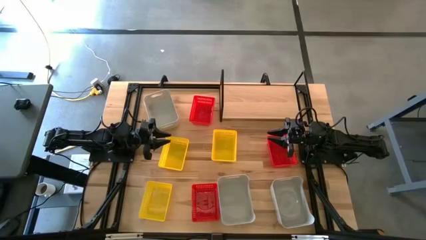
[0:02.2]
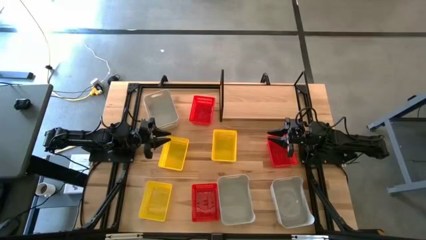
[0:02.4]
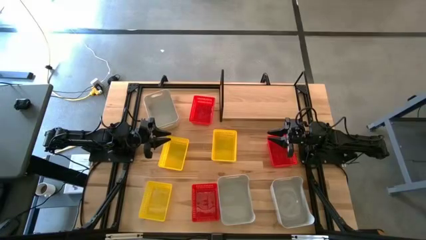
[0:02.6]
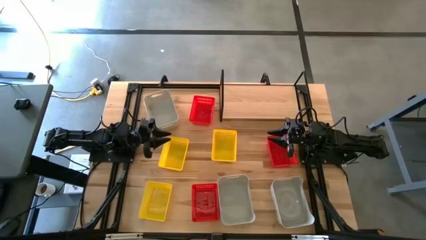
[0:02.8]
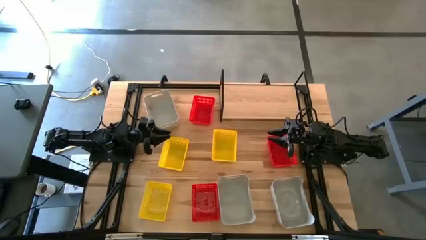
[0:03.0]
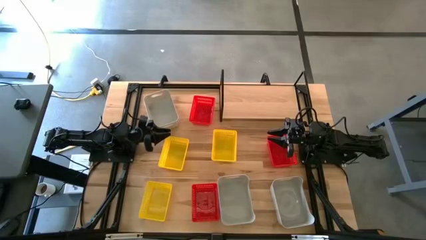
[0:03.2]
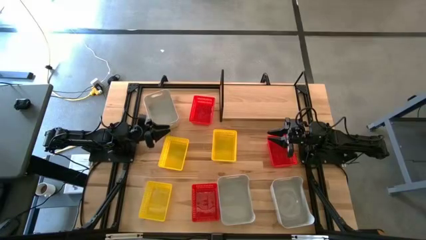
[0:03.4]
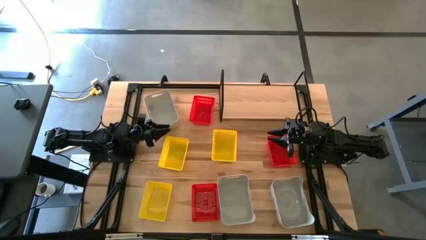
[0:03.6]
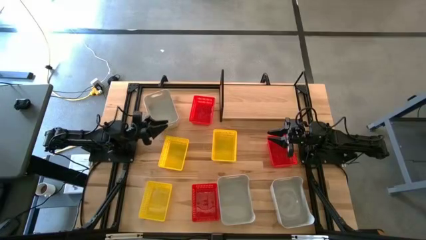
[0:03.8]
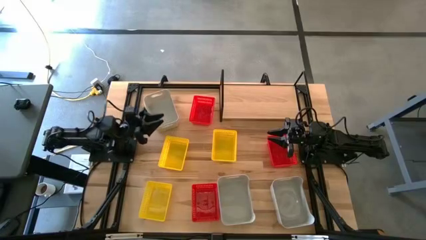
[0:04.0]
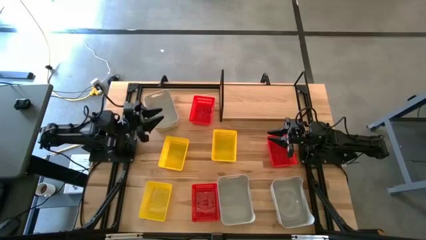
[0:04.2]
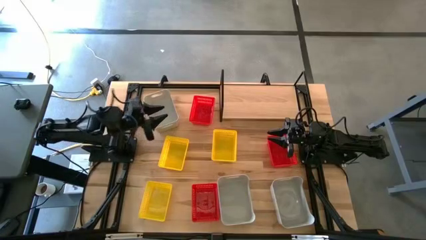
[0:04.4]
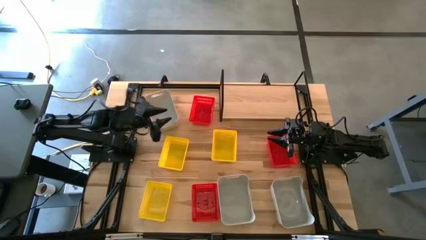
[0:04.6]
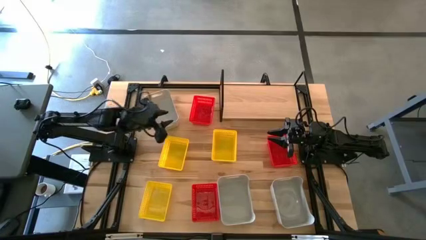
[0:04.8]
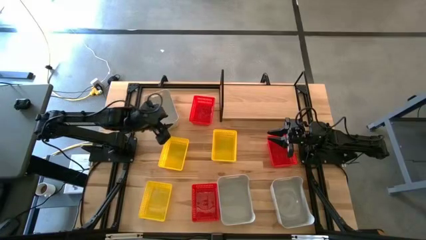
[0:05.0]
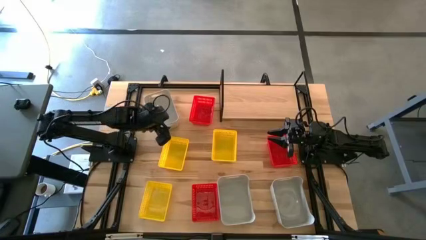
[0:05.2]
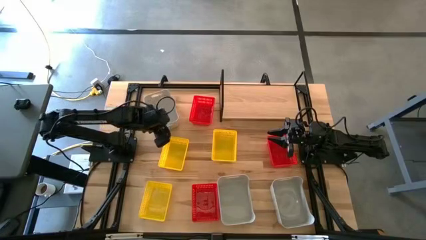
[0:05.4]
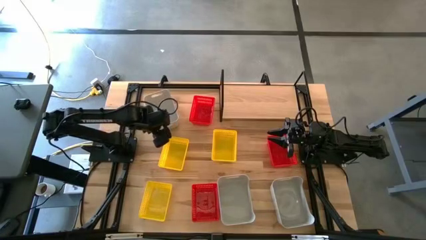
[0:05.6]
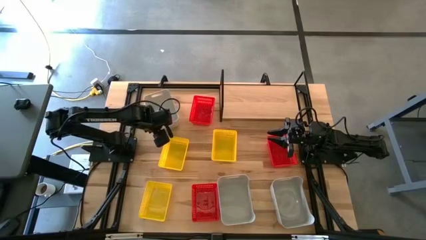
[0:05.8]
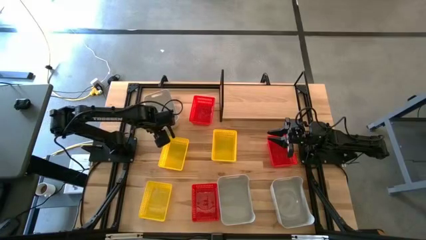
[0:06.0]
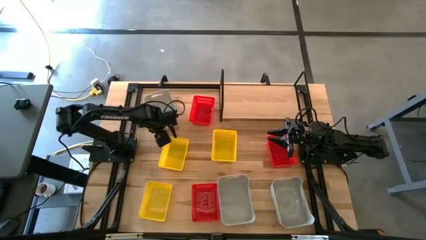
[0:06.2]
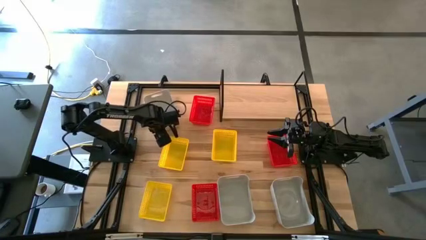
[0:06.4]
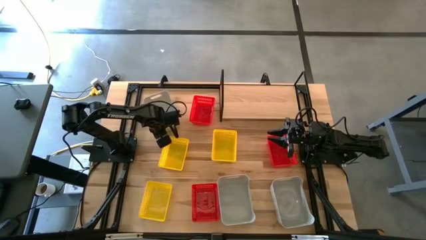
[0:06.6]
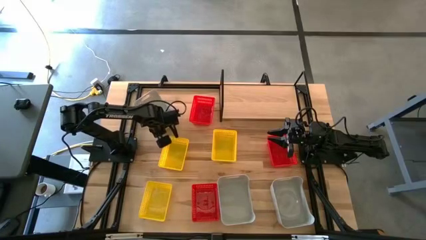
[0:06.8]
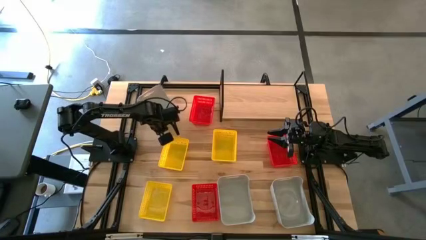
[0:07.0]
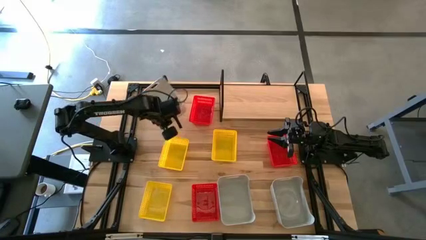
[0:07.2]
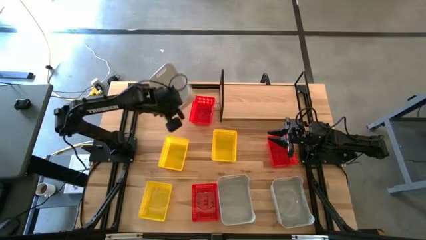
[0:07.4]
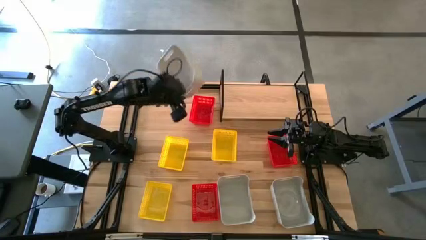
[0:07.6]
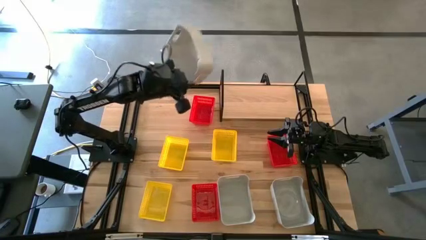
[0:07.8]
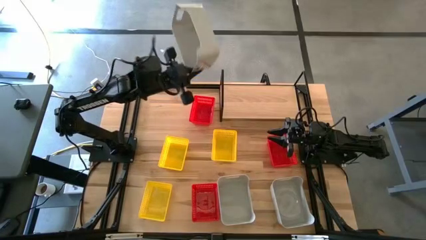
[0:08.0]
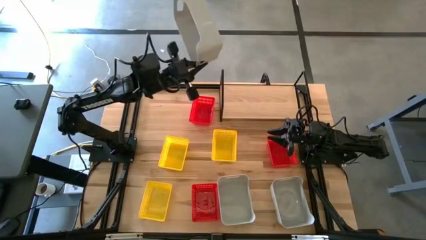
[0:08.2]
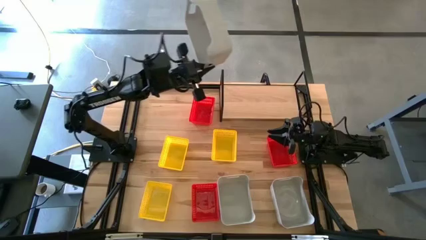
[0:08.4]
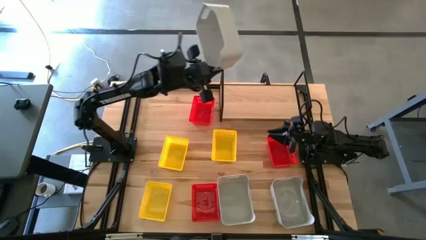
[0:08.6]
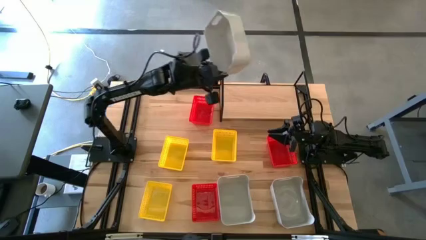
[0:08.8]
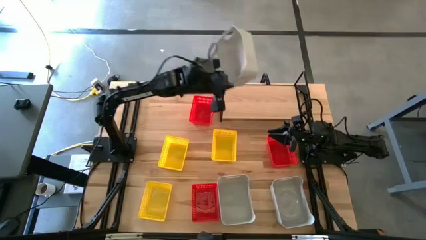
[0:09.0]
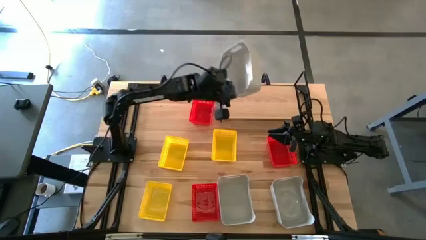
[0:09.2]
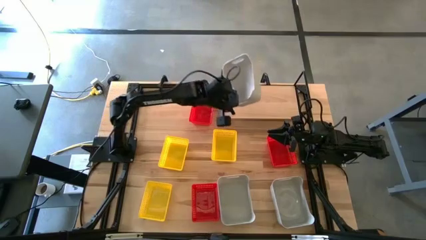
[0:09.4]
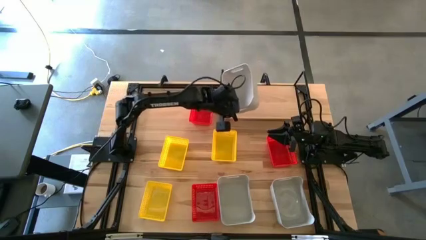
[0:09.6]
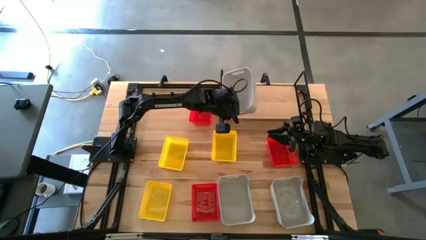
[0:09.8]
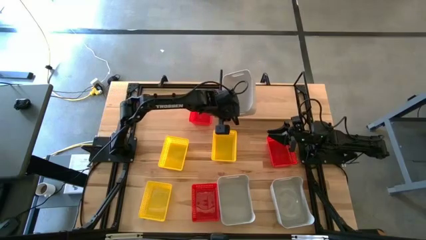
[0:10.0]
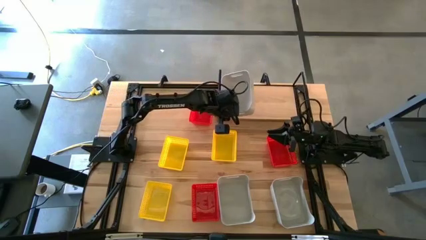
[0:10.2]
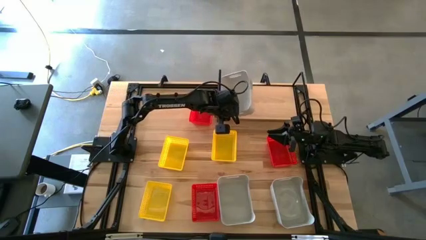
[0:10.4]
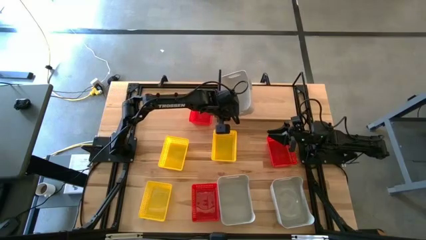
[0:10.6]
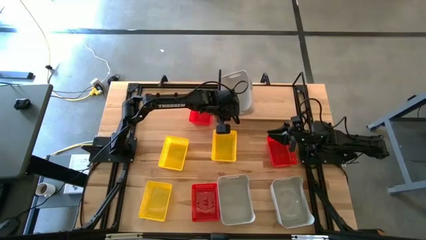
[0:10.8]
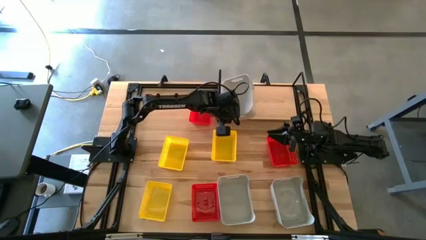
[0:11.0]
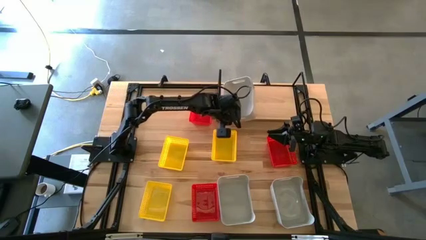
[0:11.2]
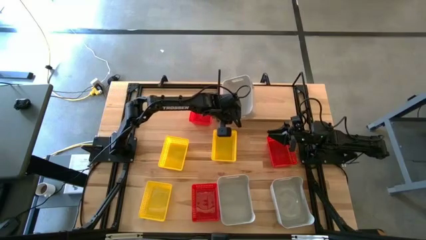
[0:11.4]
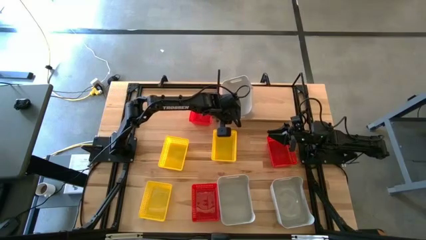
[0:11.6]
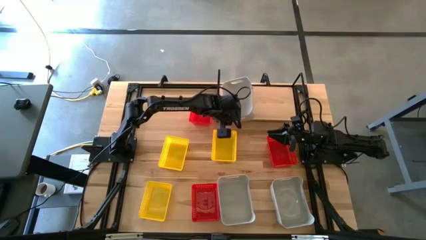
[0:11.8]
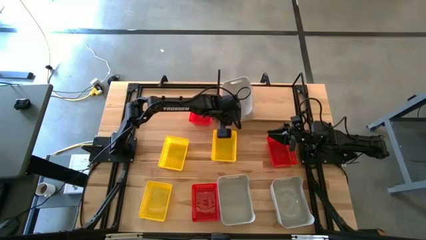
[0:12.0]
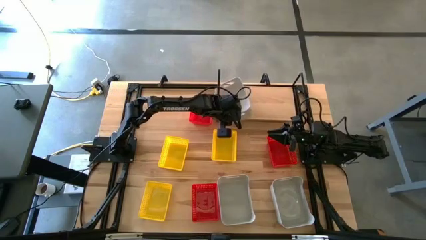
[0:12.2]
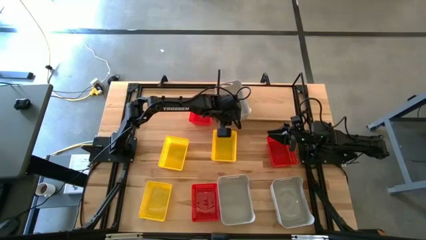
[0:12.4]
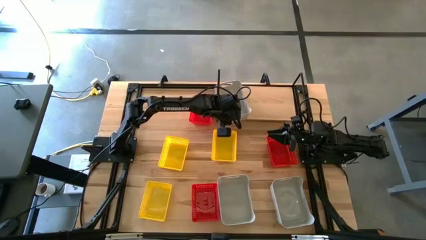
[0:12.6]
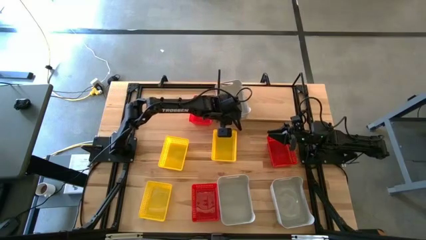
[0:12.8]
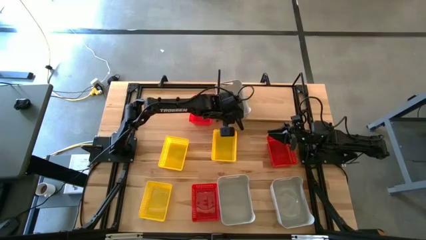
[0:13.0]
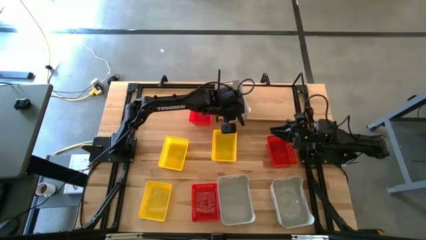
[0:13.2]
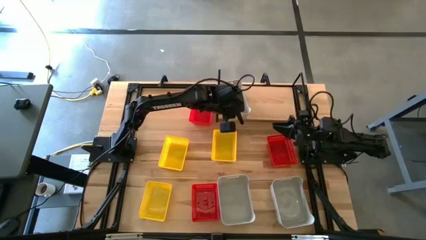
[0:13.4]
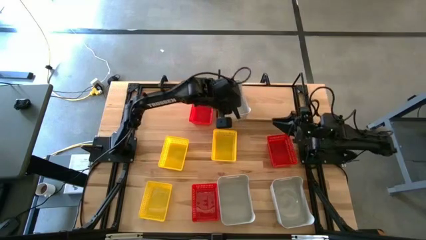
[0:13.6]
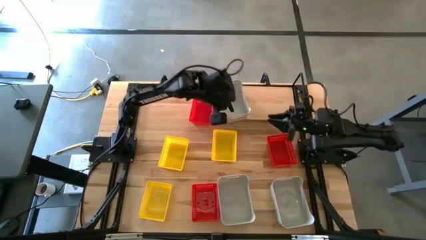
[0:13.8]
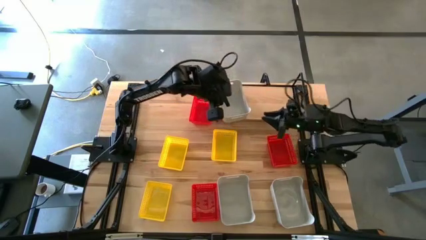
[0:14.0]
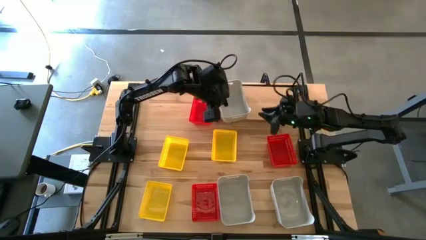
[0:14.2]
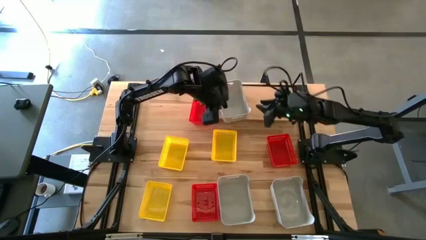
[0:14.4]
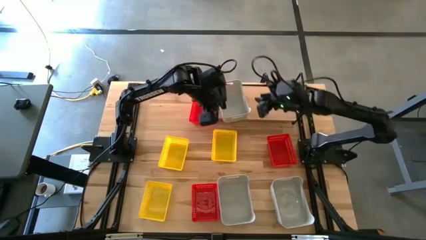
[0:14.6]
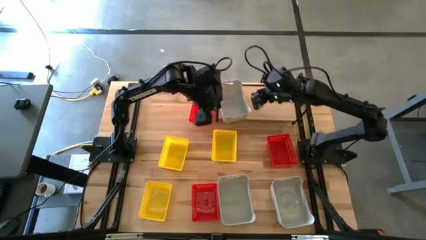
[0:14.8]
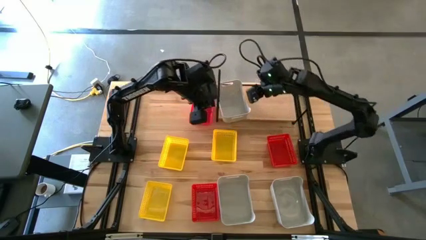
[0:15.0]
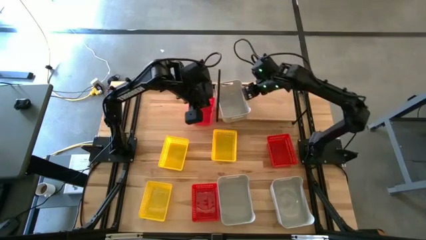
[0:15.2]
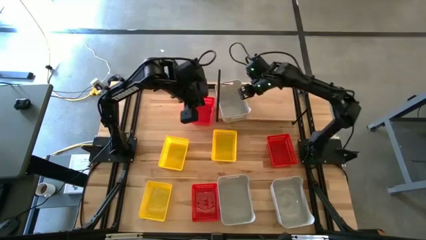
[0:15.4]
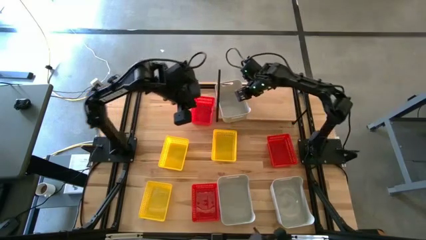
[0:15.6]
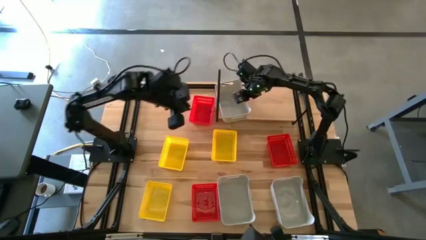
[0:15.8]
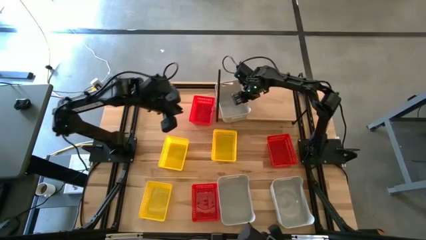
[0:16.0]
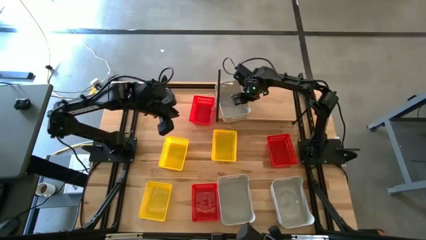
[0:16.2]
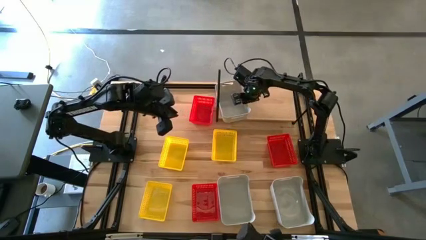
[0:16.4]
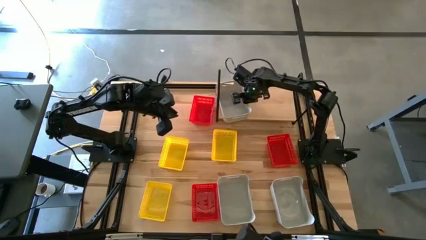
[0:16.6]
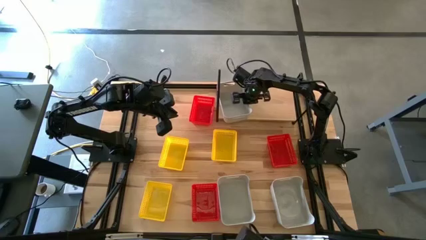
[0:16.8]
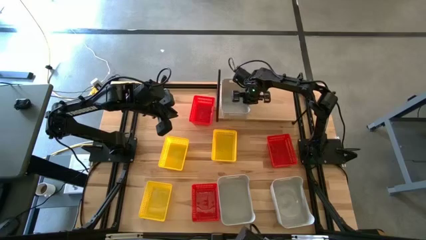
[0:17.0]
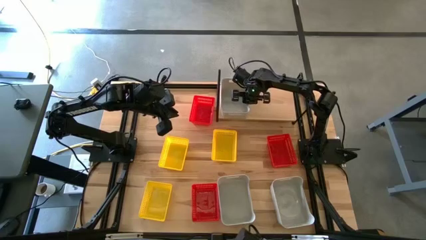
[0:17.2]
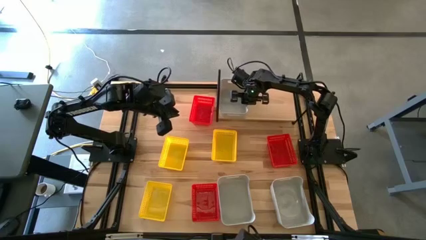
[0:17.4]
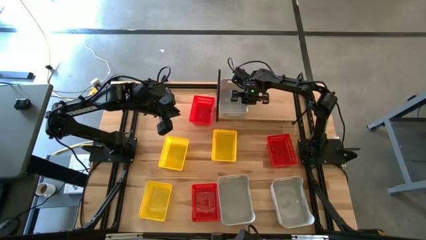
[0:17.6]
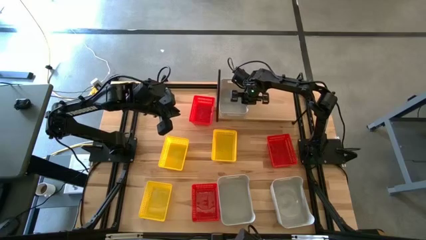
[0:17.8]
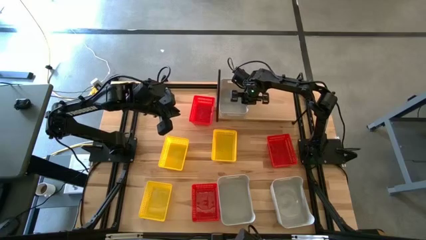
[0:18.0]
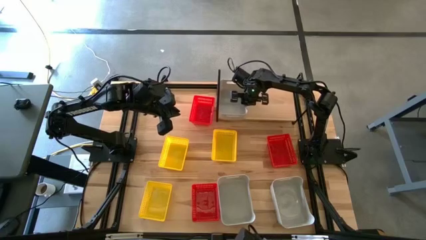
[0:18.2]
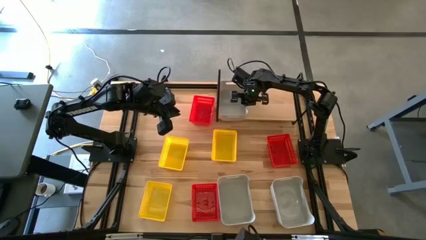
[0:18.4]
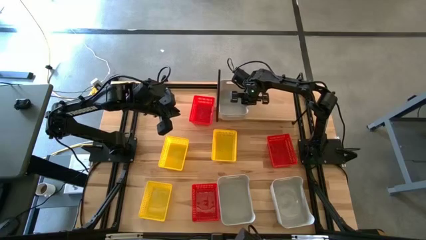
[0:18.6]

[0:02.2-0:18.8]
Task: Stack baskets on shelf by color
Put the top gray bin on the shelf
